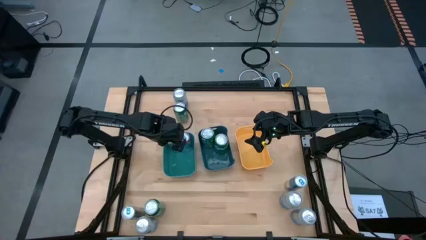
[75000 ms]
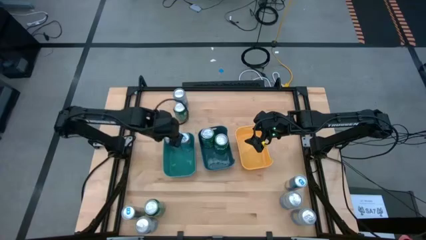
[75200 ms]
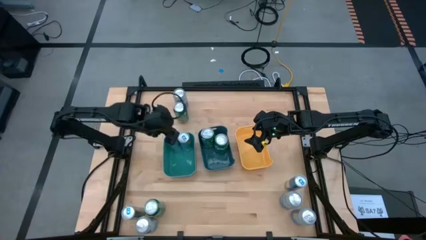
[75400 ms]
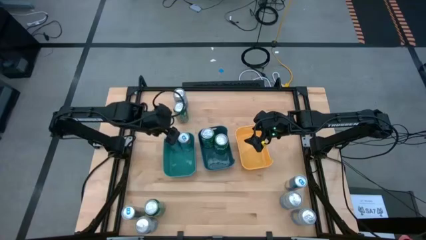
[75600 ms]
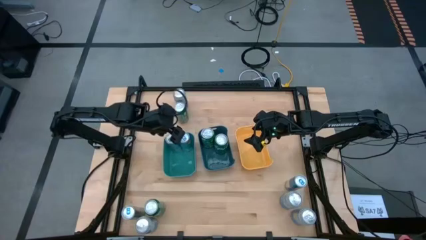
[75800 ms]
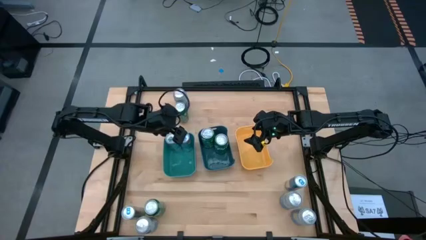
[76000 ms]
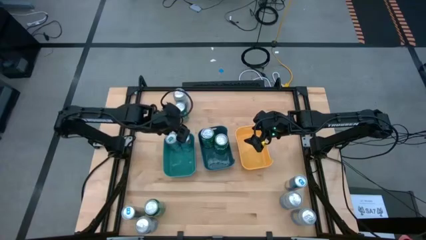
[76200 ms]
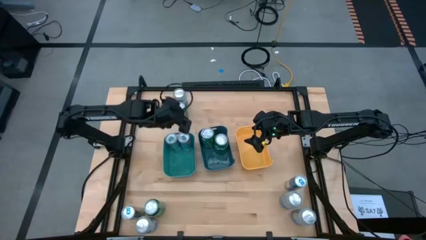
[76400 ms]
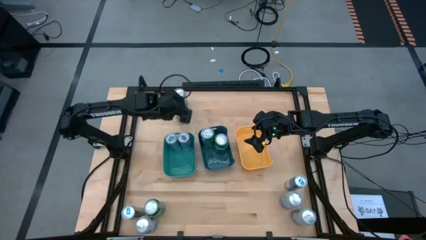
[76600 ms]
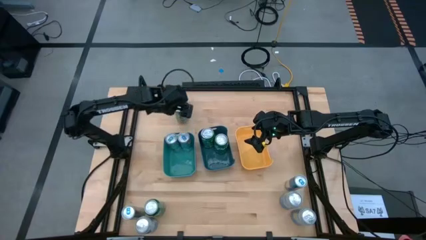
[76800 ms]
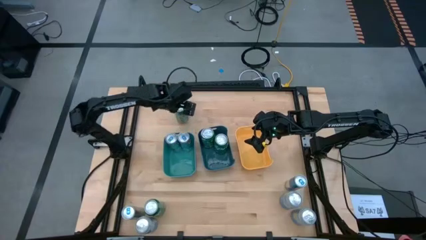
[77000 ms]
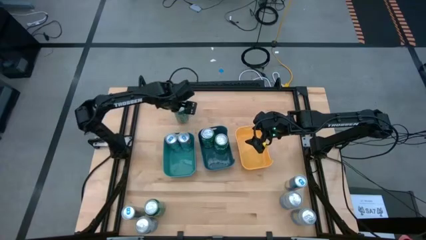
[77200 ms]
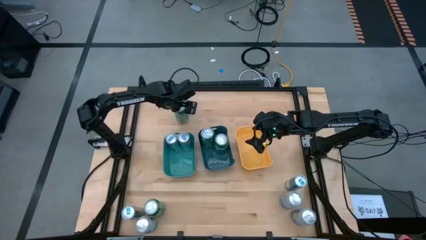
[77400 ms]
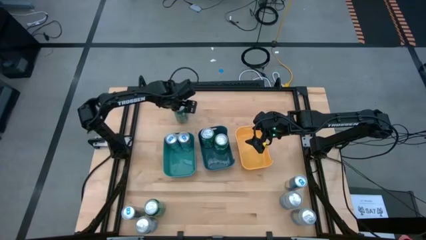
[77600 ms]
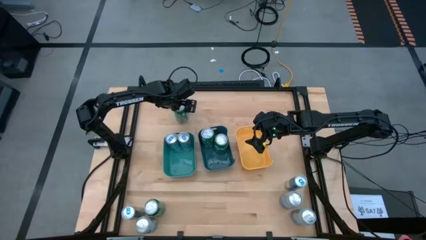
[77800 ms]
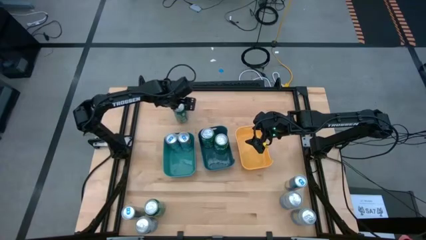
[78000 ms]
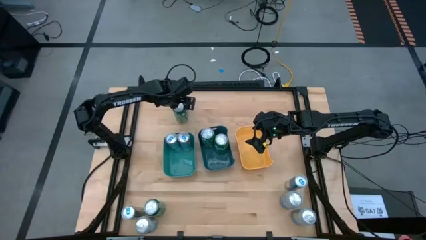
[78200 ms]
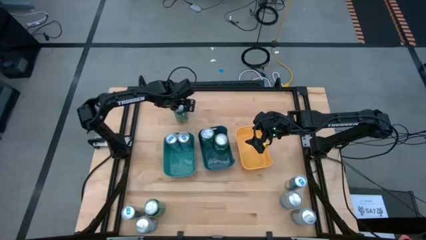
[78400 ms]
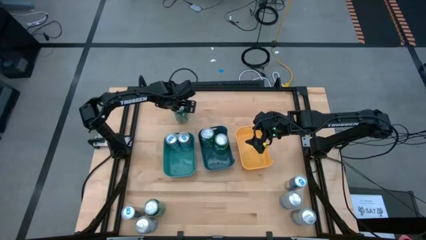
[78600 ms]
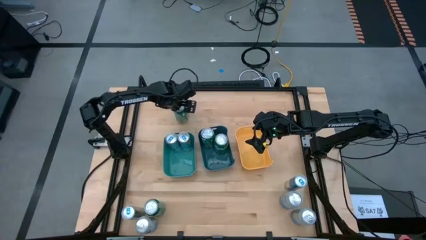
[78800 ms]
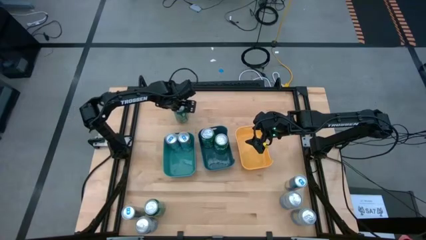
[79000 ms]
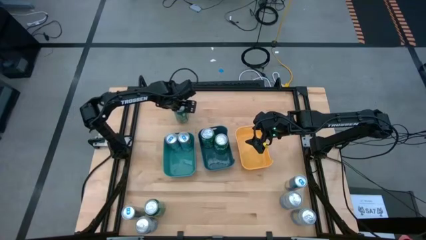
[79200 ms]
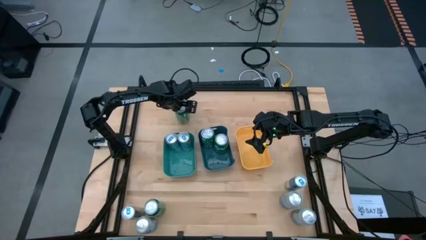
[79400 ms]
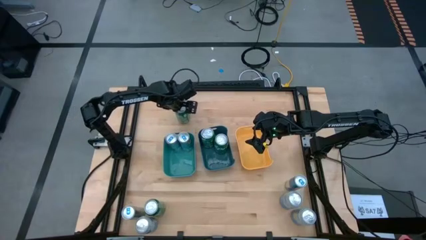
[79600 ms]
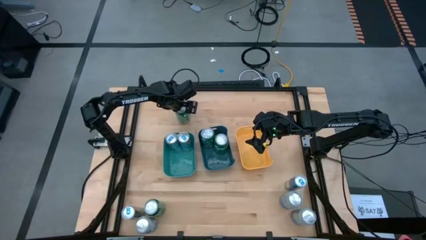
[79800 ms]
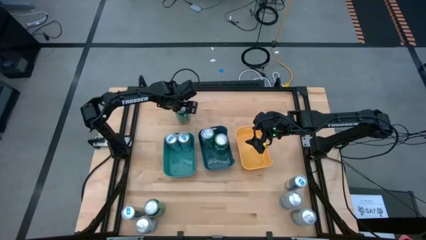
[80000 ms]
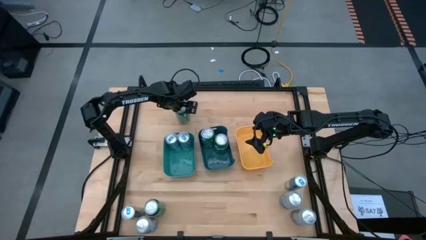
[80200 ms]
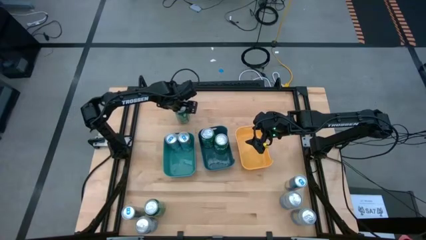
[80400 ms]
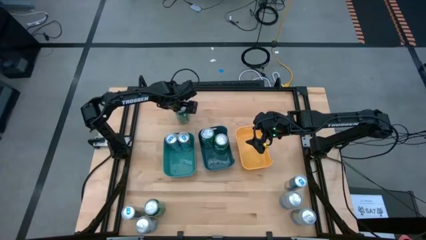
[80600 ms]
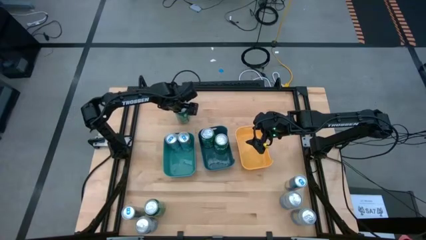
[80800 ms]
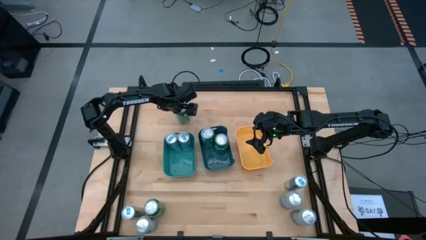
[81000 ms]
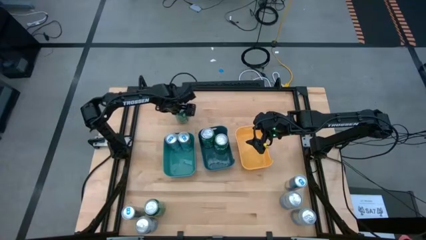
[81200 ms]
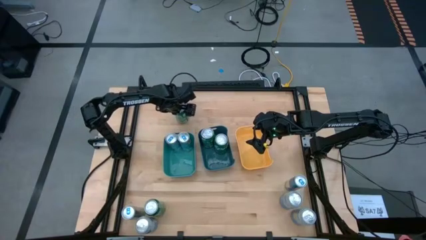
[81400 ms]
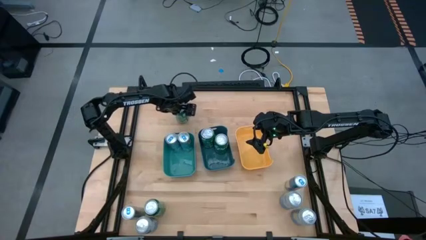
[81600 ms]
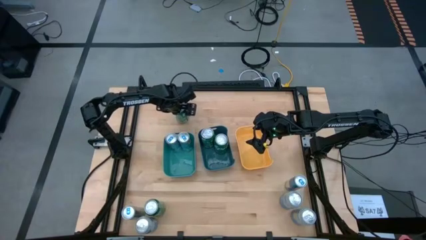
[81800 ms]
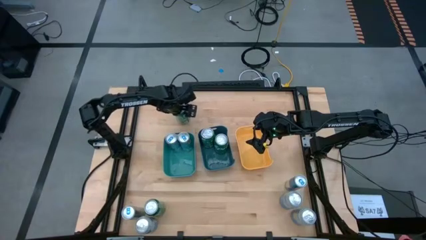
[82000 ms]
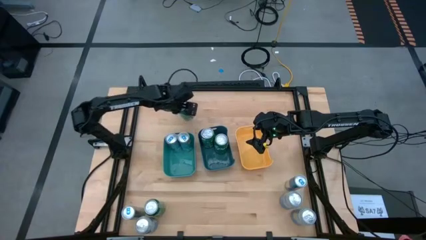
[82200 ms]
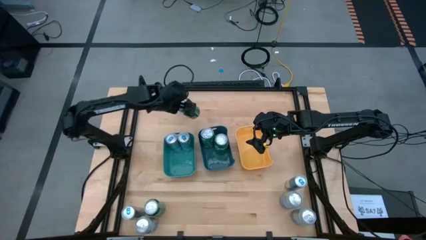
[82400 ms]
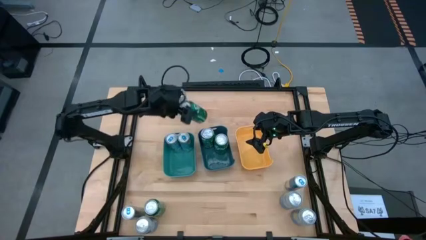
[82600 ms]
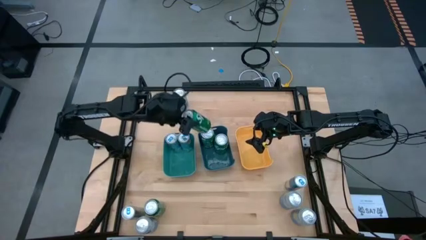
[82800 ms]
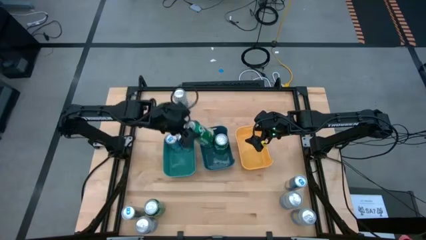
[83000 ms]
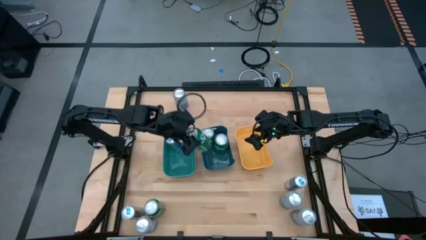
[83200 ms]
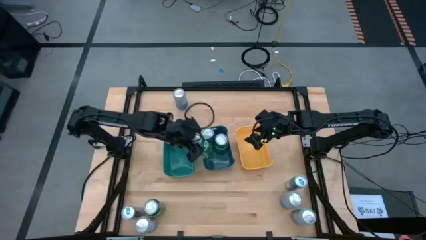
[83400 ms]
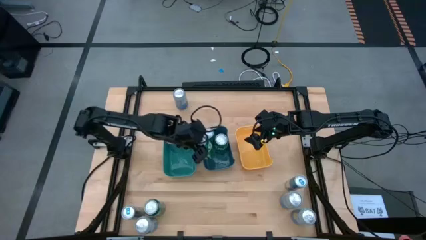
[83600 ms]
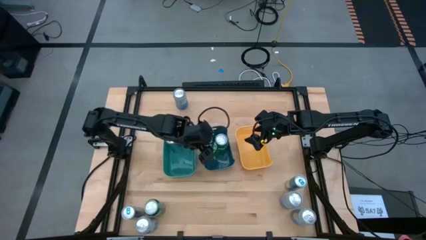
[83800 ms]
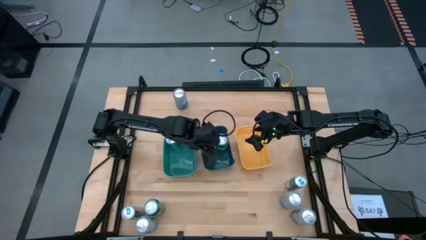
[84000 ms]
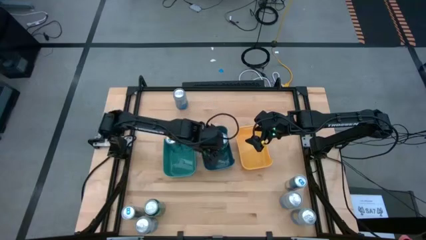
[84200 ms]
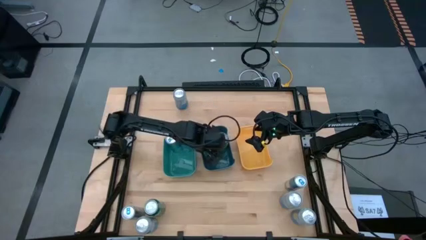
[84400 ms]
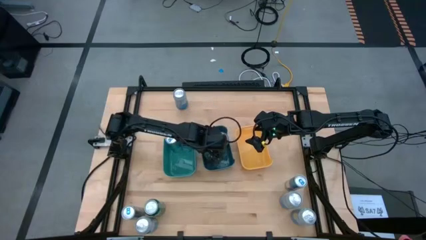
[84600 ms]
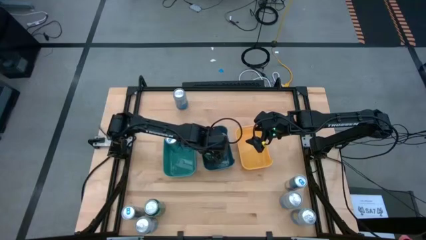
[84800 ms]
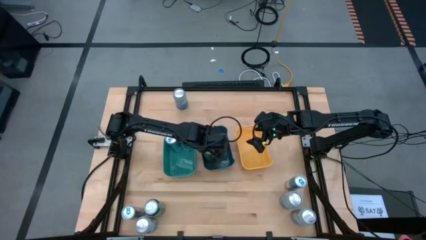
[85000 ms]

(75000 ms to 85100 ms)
Task: Sort soda cans
Put the top green soda can into the blue bin

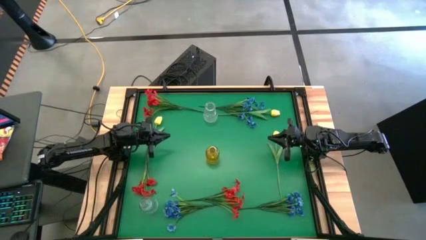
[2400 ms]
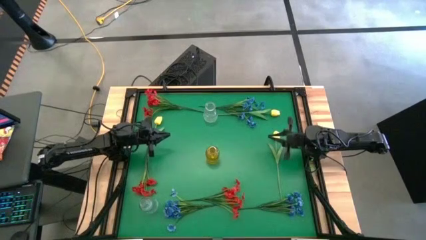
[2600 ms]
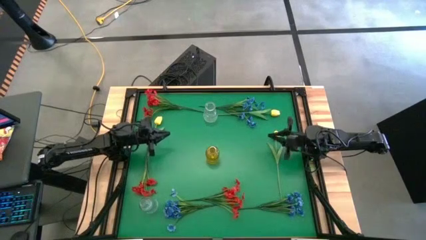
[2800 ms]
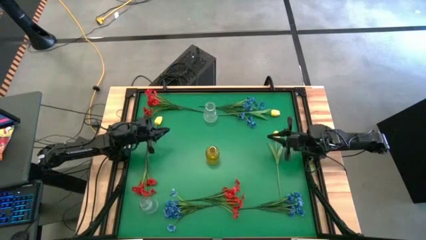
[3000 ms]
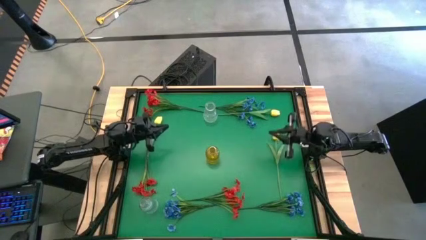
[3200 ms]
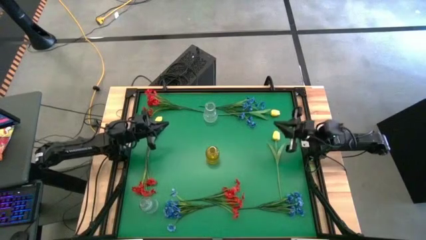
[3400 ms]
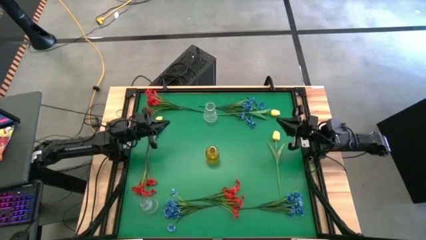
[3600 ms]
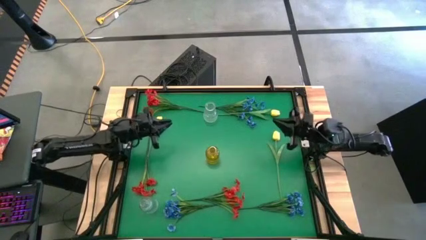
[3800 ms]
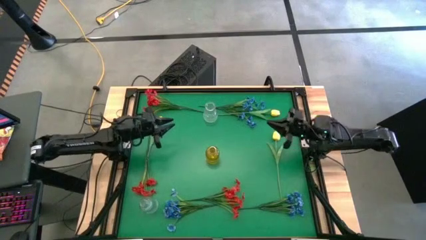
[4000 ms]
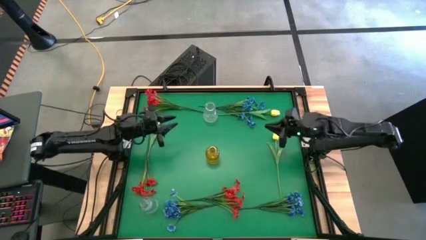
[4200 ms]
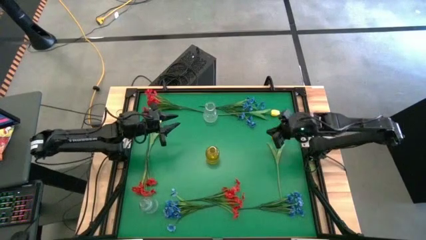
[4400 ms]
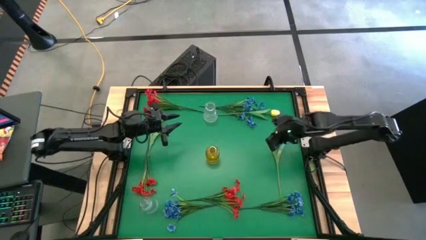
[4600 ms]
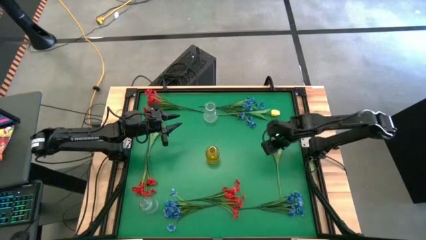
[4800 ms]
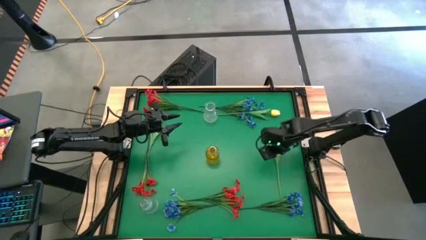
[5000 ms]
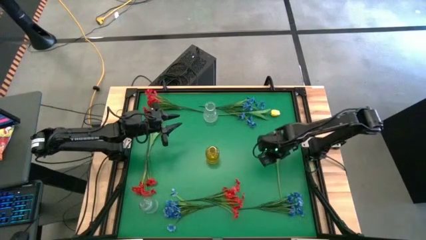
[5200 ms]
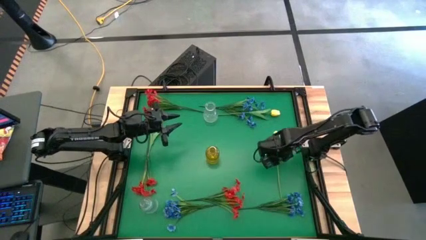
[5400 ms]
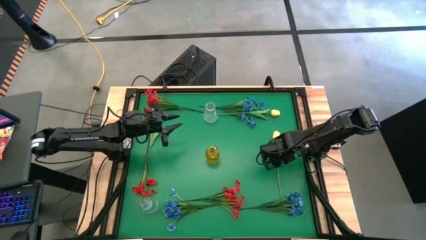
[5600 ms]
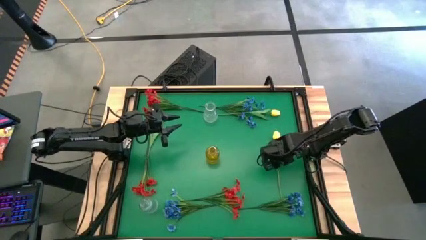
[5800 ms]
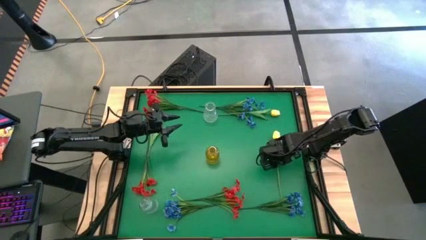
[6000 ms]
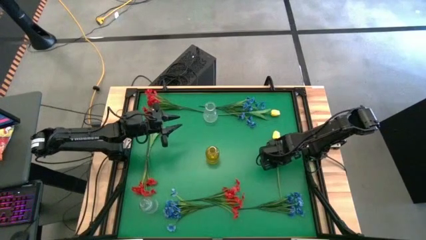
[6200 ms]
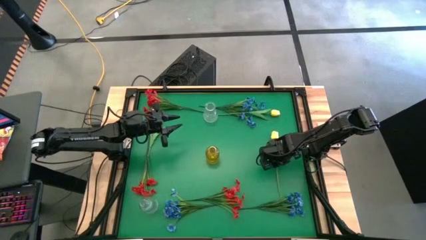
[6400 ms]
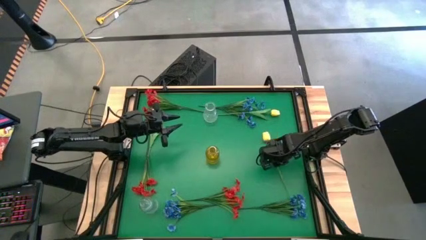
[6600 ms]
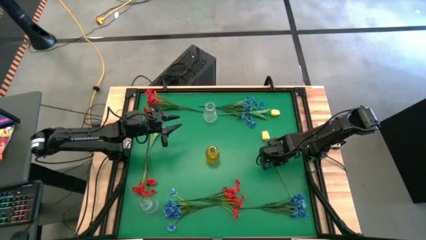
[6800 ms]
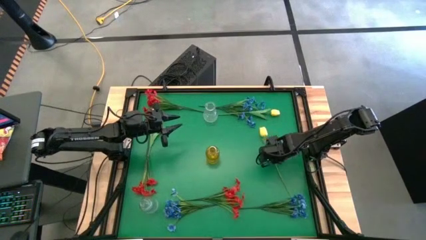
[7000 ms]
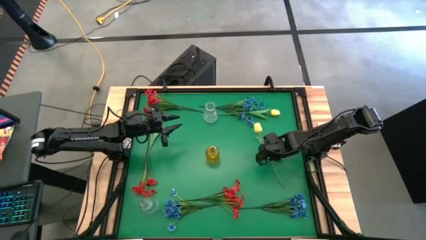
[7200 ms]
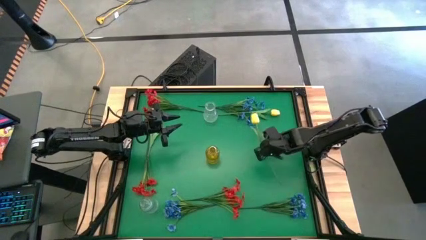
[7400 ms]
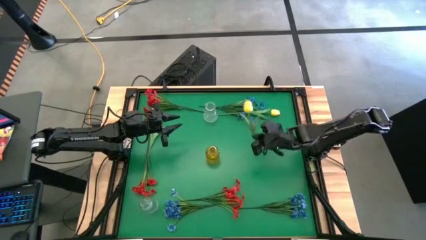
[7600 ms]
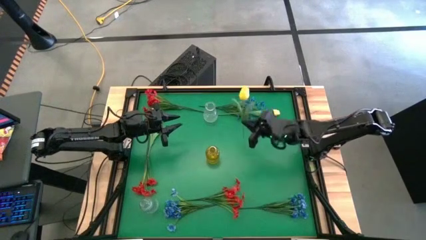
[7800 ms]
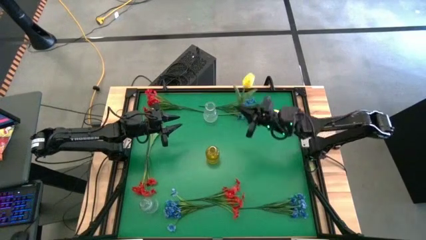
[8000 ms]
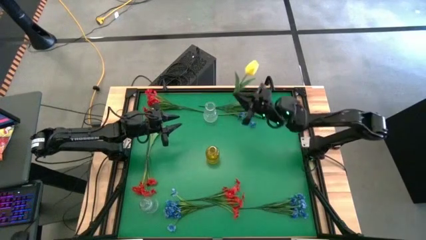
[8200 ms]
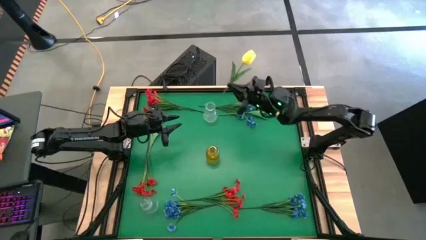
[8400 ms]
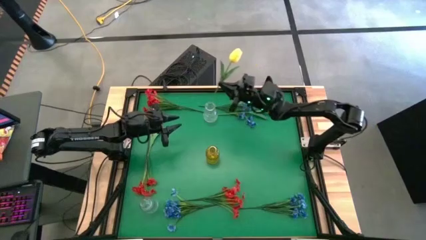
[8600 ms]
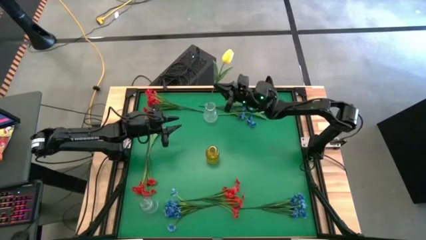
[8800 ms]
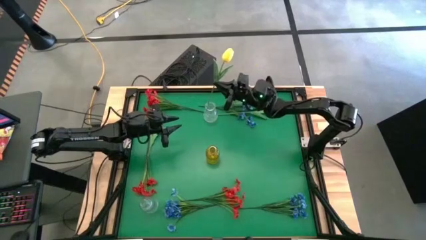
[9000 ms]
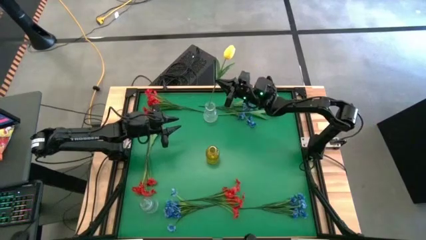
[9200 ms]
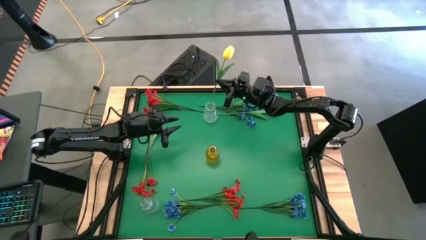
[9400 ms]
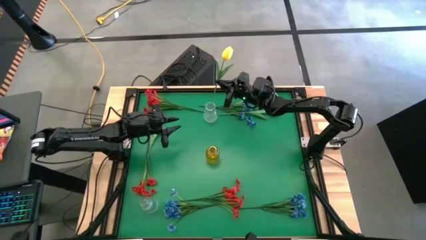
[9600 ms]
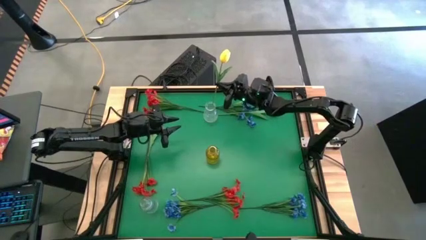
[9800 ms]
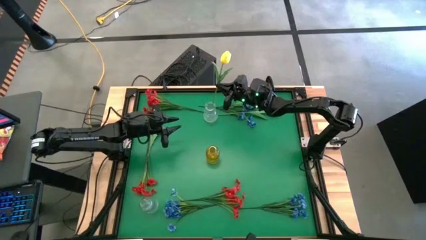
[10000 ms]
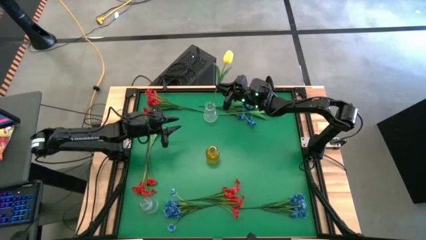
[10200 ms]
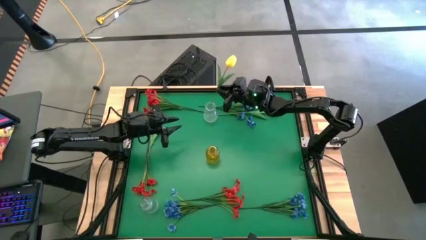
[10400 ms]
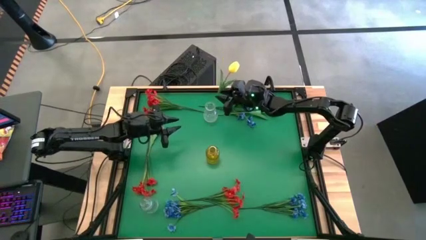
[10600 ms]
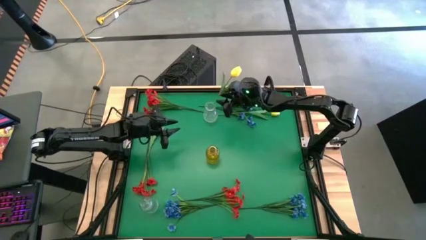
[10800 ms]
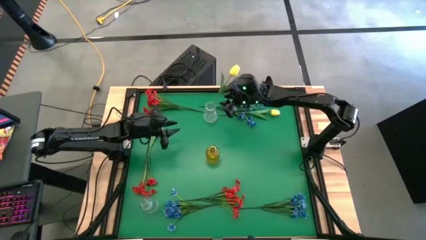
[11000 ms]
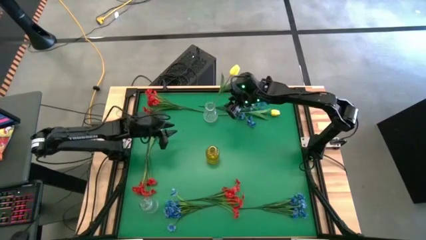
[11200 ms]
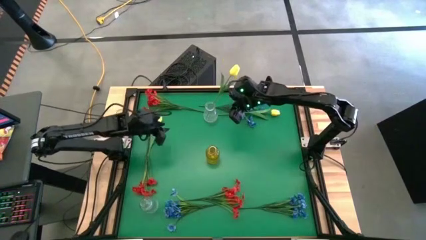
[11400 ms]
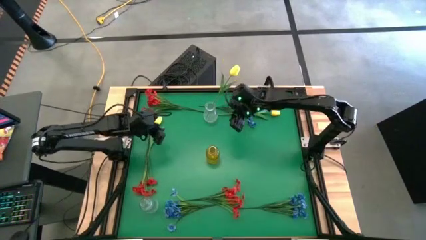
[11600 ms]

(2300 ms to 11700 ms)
Task: Sort flowers into vase by color
Put the bottom right yellow flower into the top transparent vase
